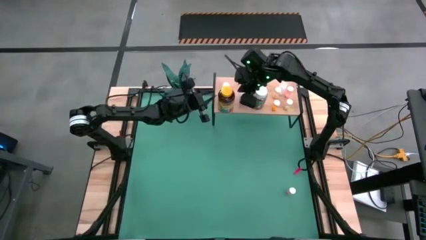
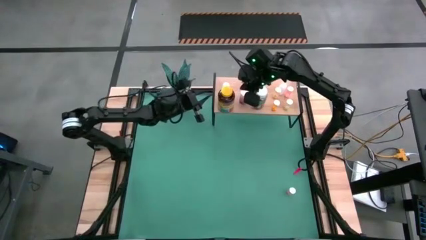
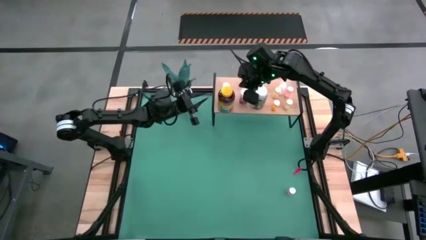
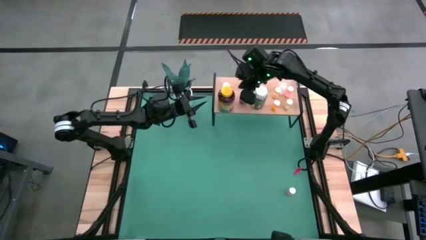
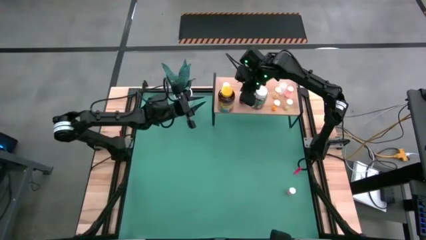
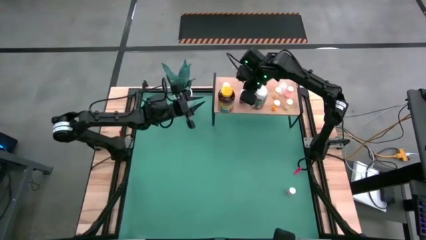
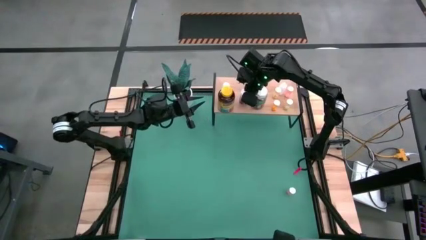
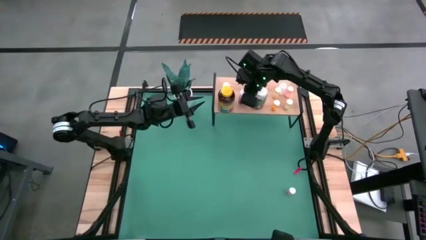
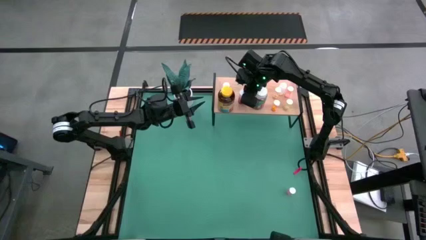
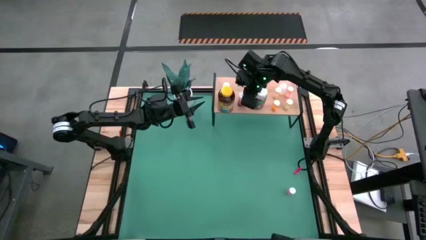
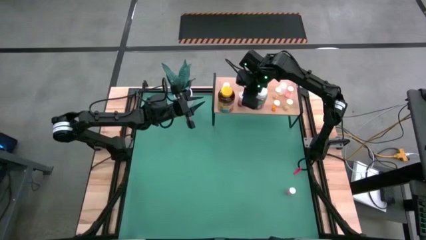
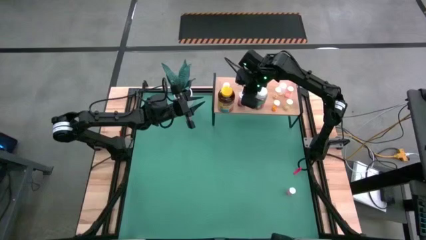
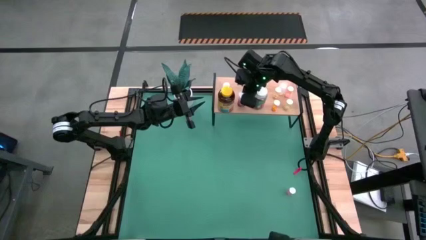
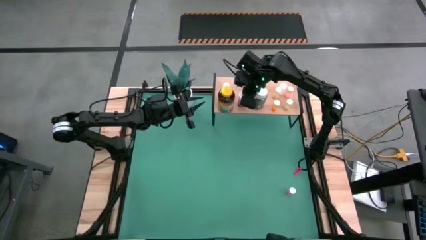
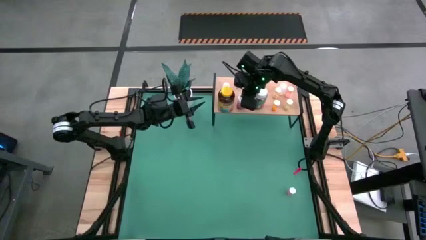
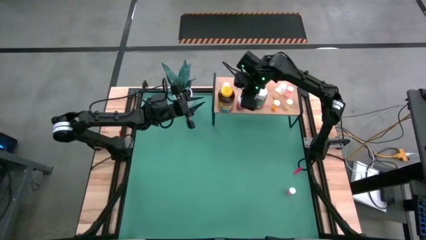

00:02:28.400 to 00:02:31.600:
Task: Pick and place medicine bottles onto shelf by color
Adjust the pink pill bottle on the shelf

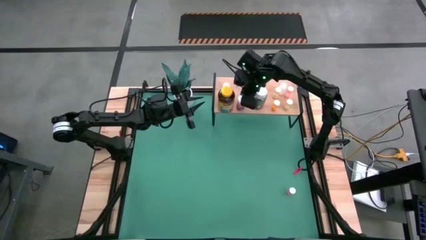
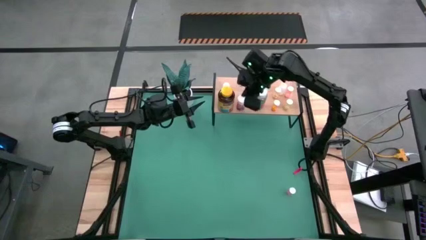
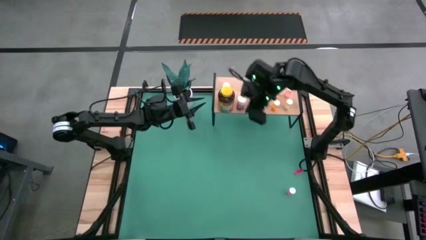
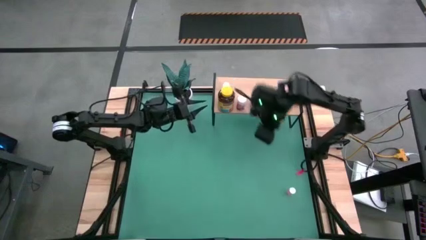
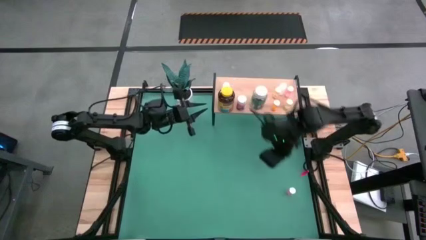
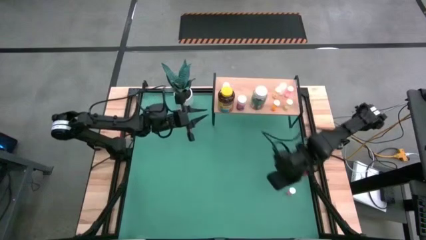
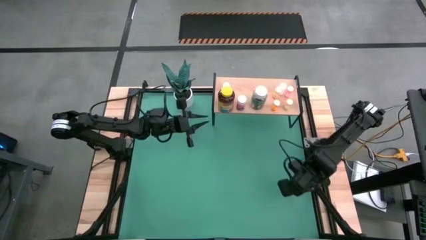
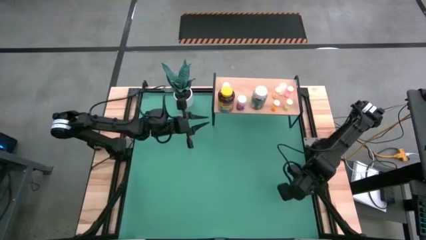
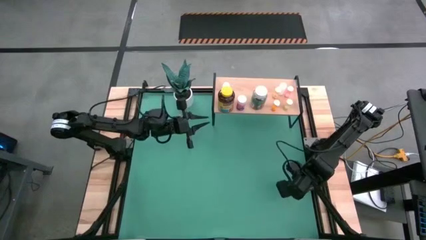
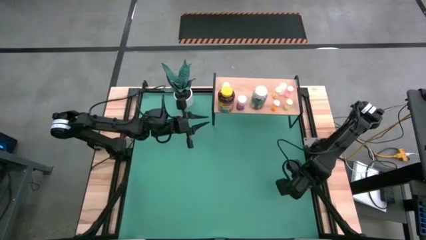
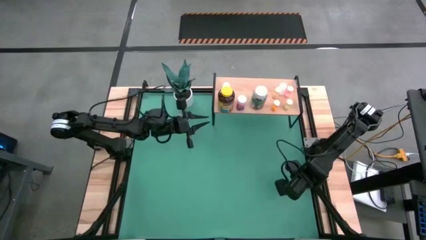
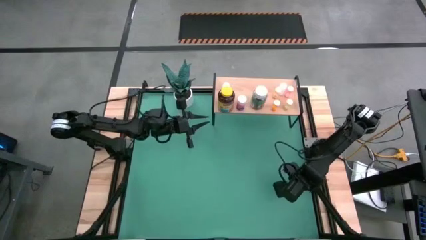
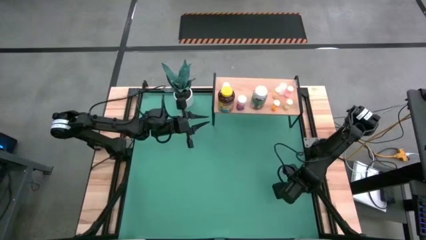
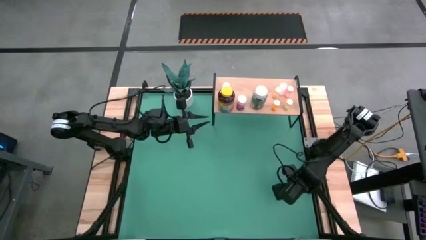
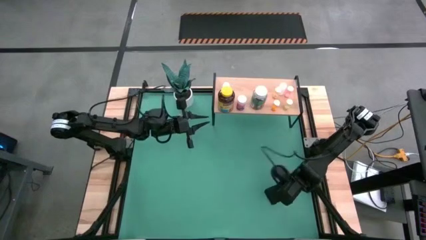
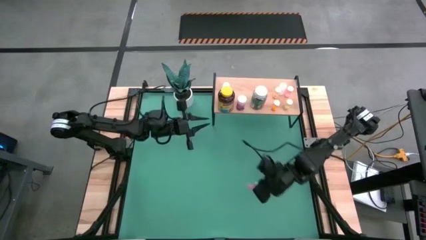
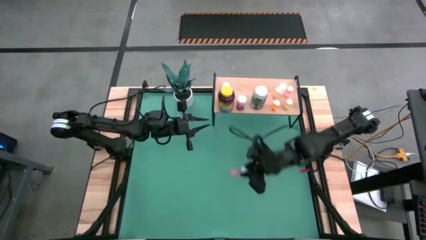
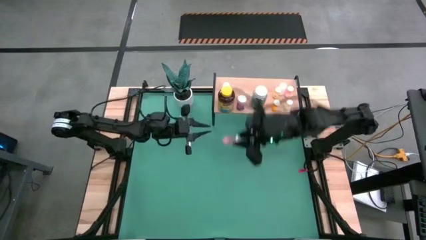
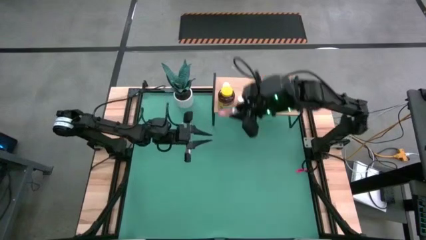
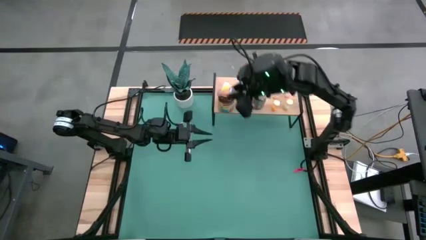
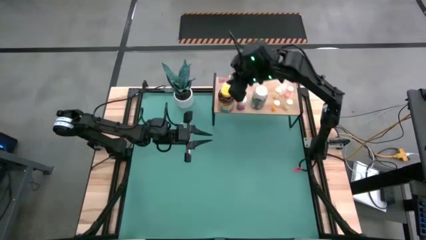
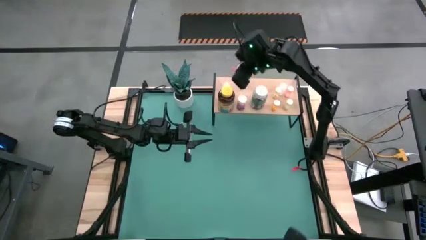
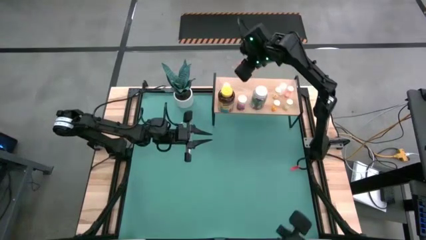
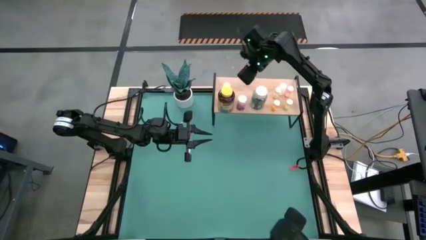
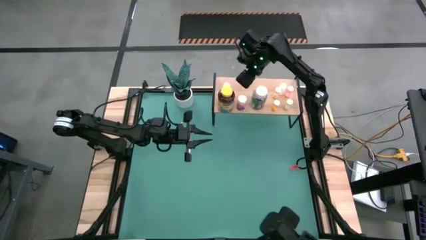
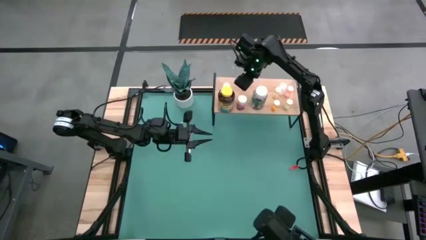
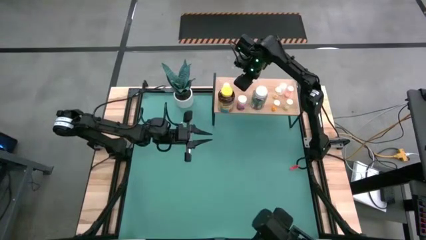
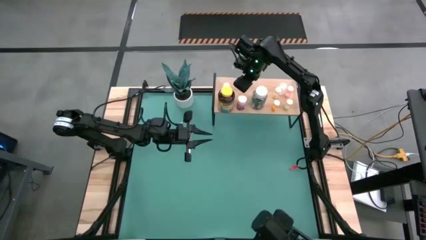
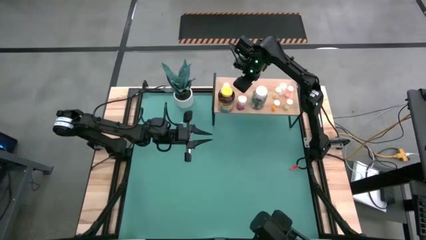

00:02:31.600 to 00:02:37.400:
Put the light pink pill bottle on the shelf

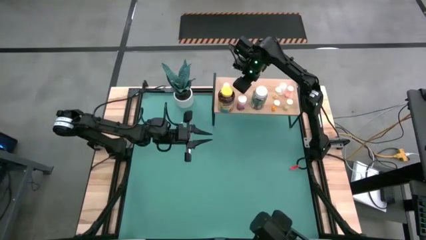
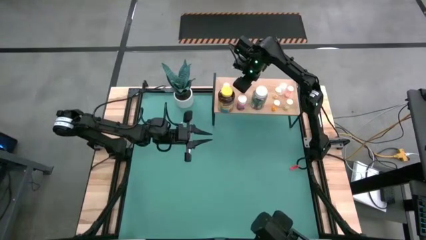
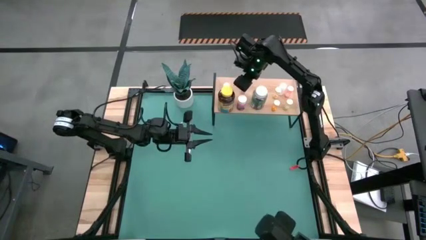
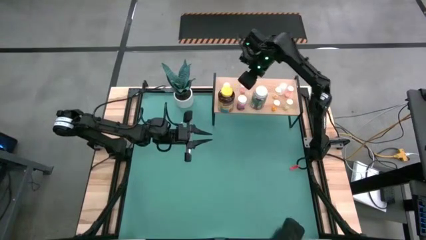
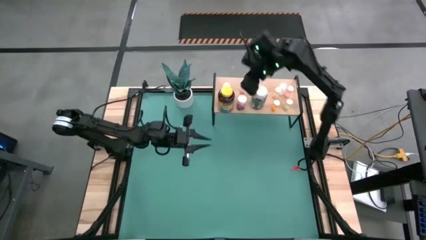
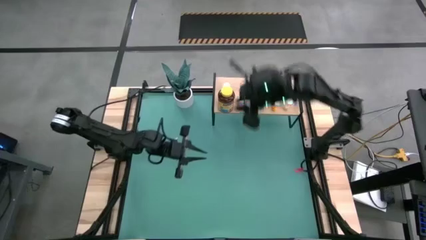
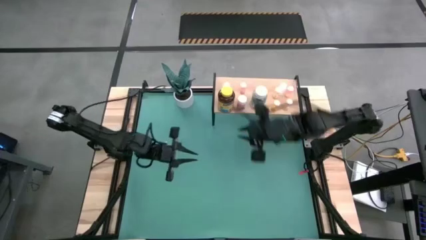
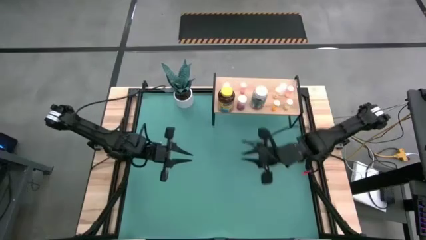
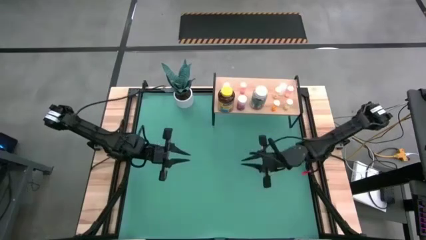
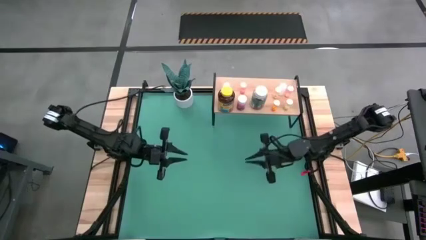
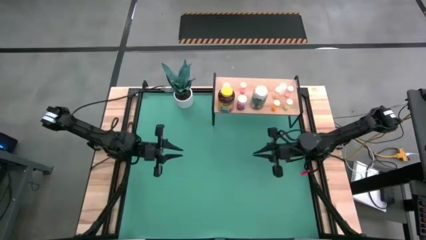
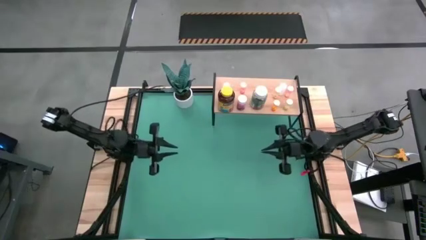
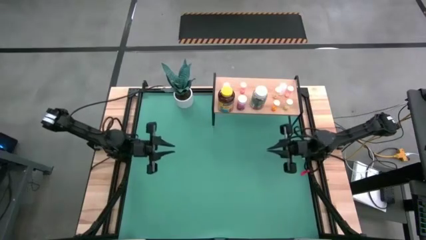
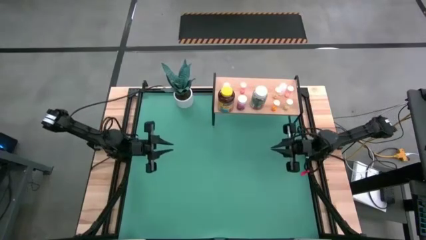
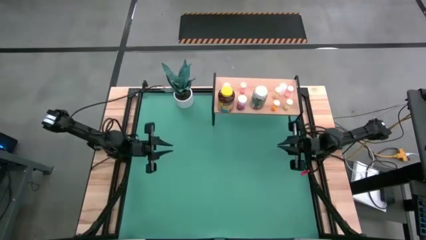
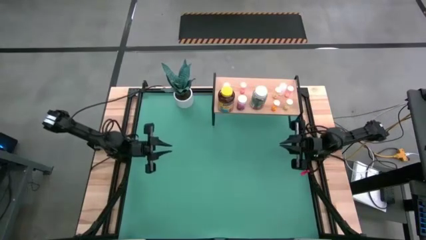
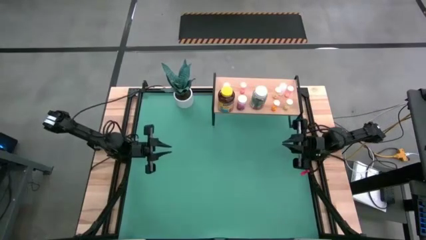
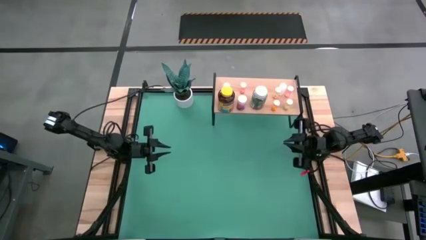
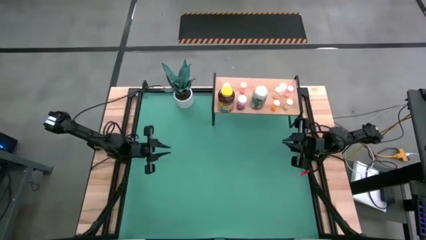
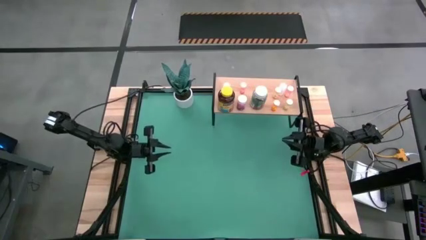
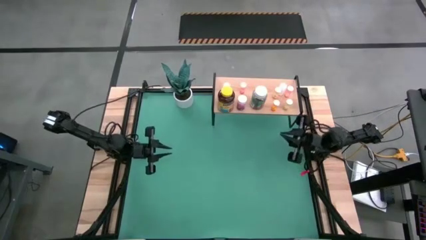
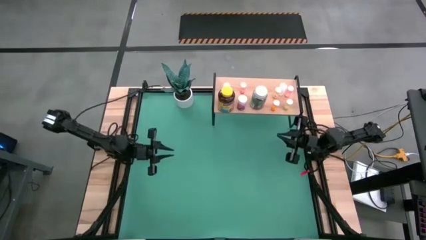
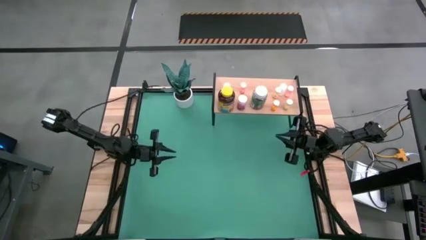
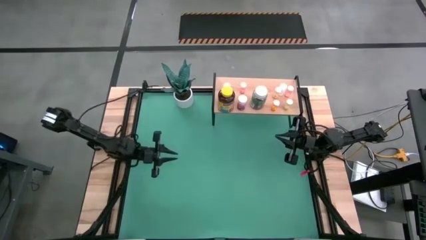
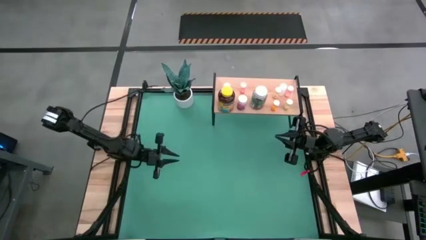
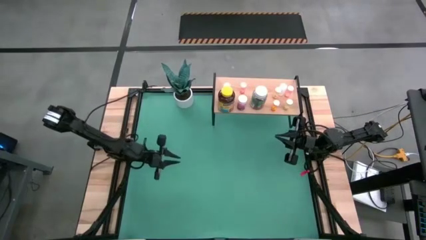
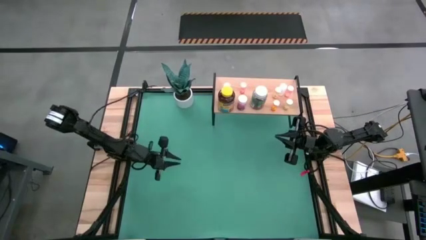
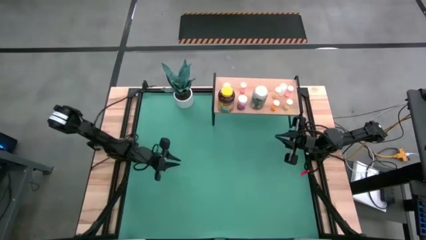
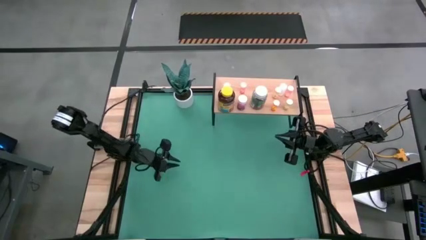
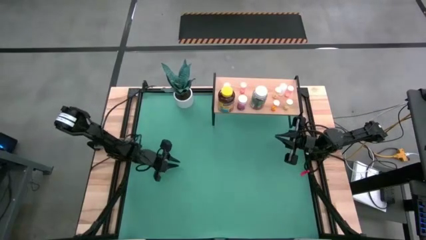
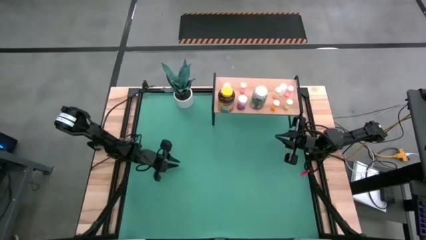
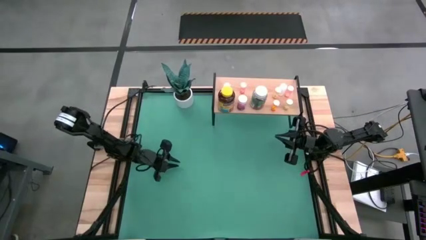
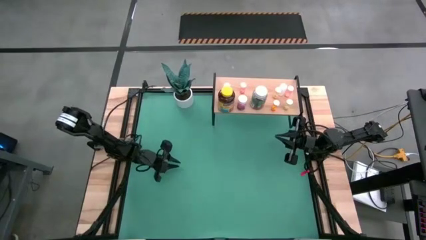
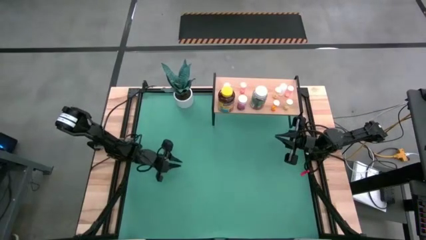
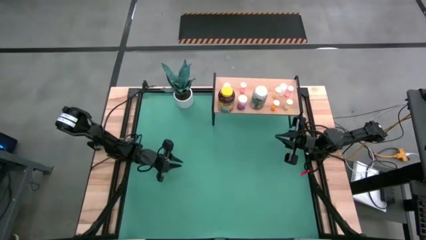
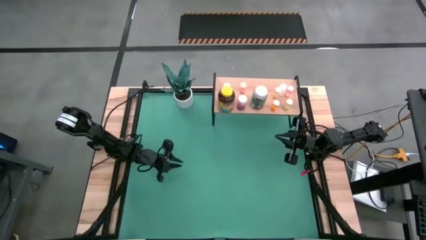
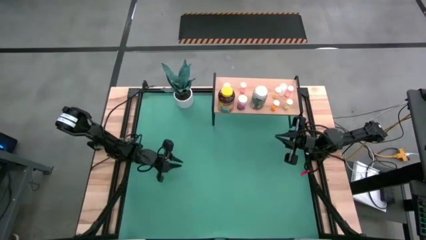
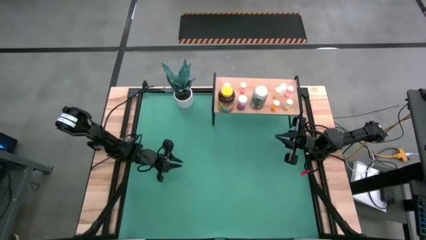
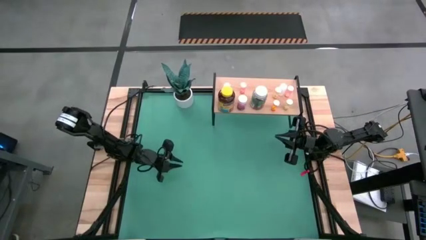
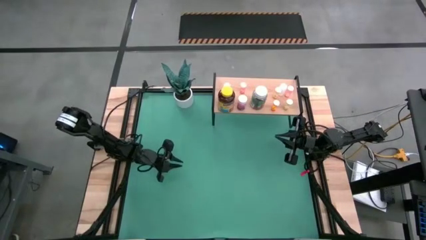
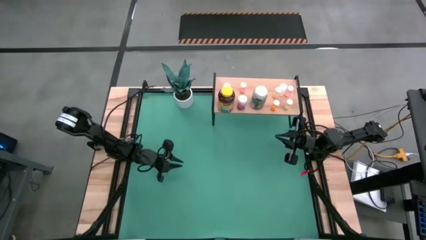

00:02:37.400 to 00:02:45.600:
Return to Home Position
